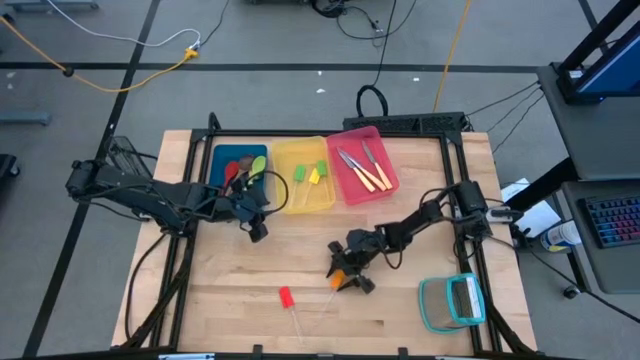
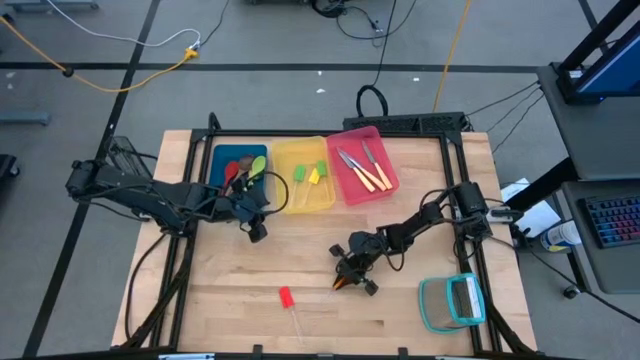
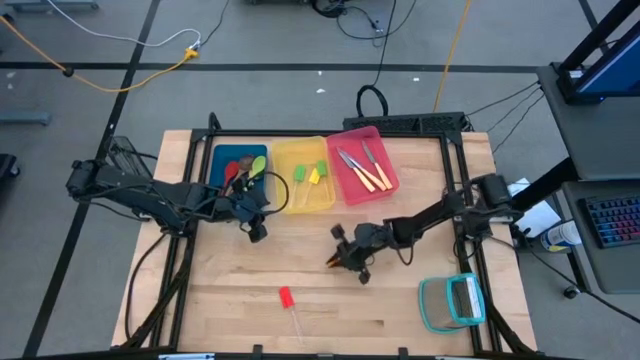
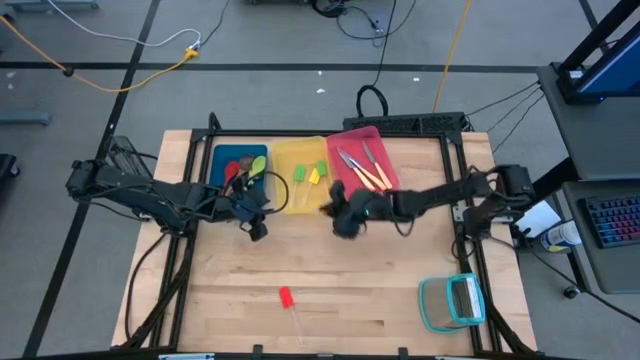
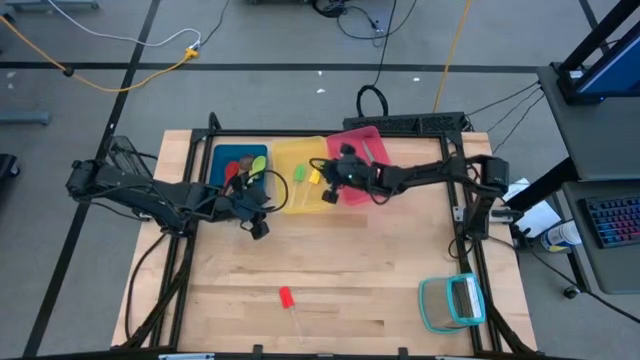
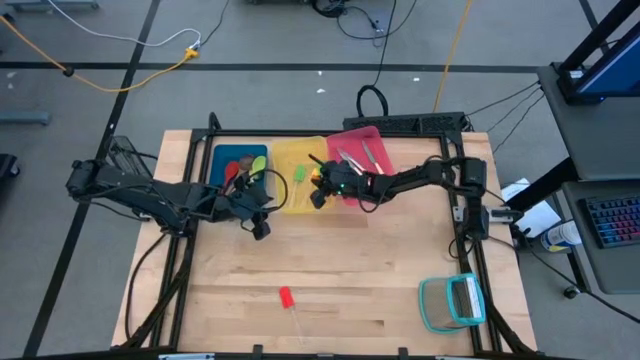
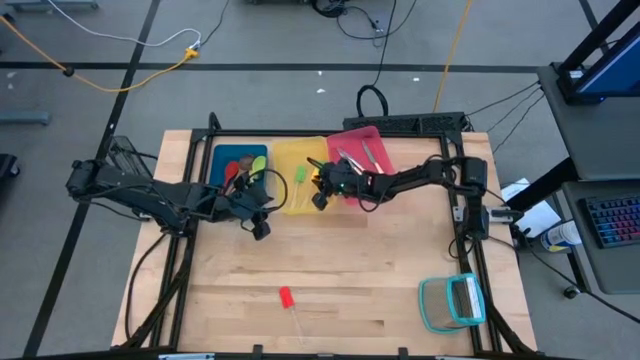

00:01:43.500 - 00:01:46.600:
Task: Pick & Place Kitchen Items
Put the orange spatula into the yellow bin

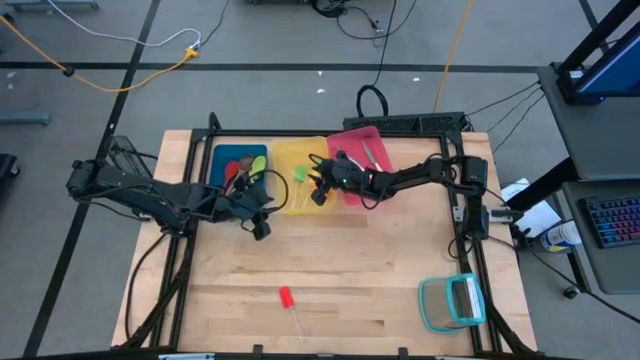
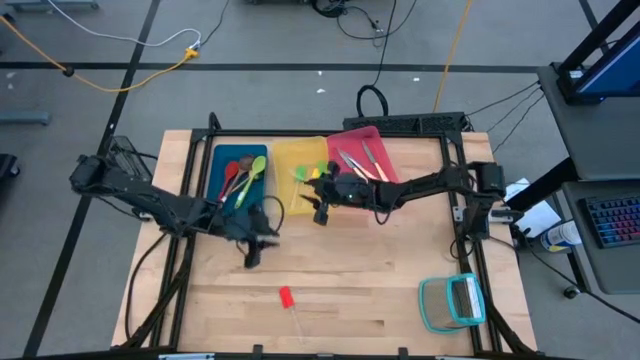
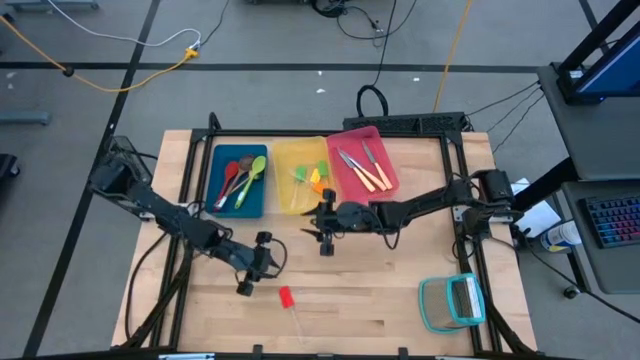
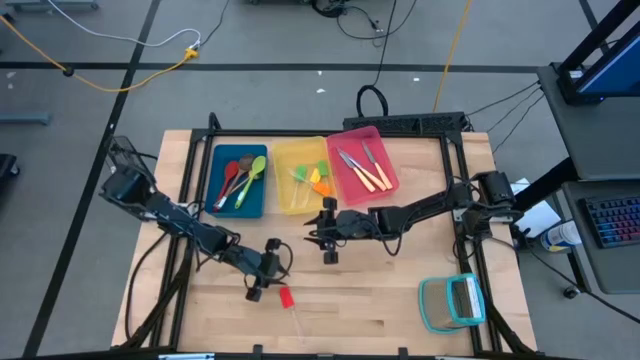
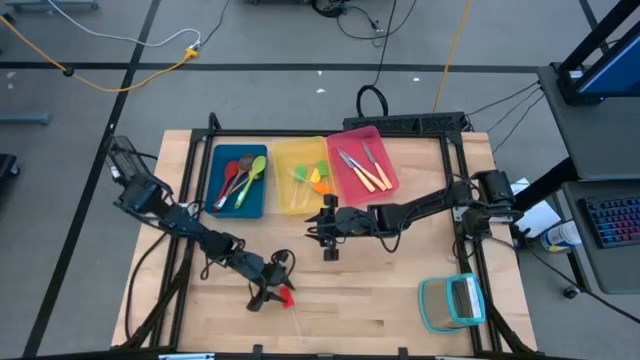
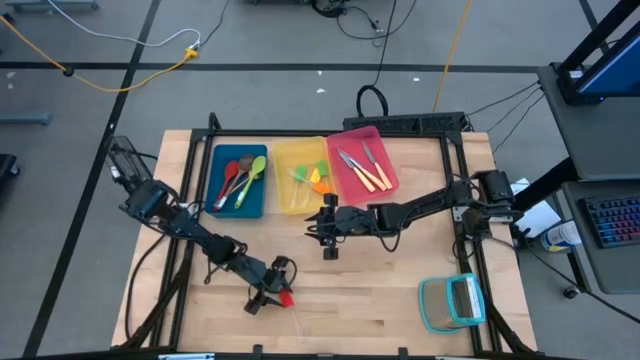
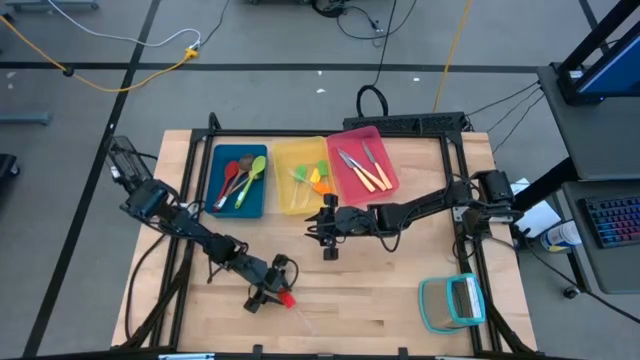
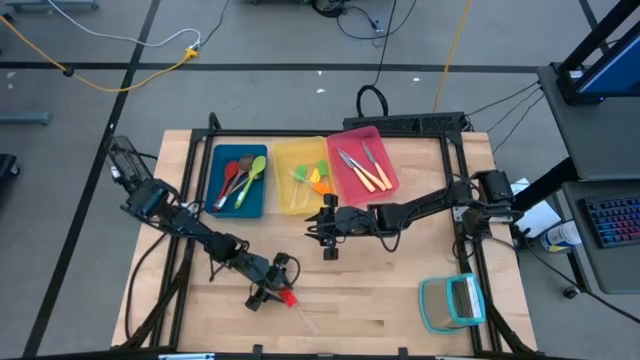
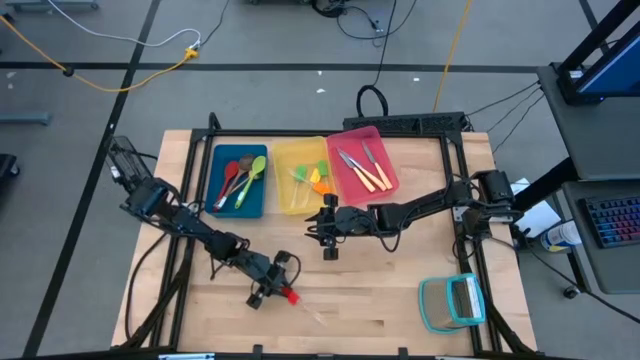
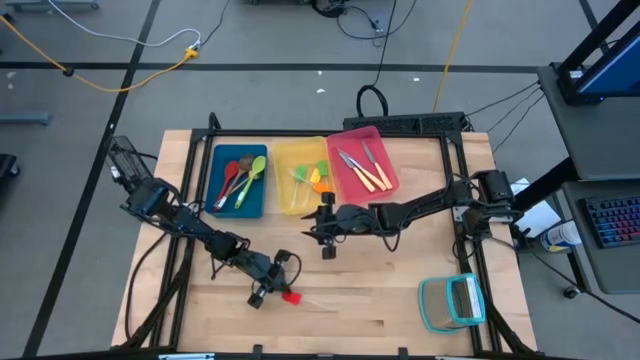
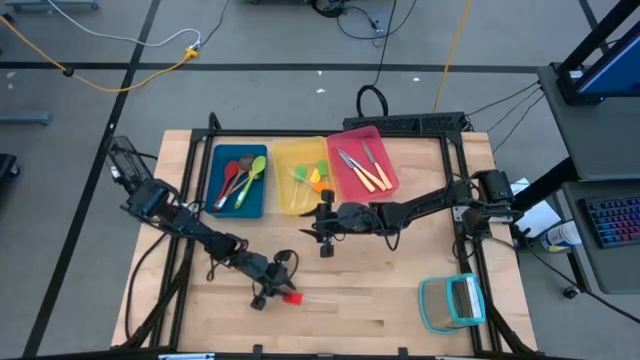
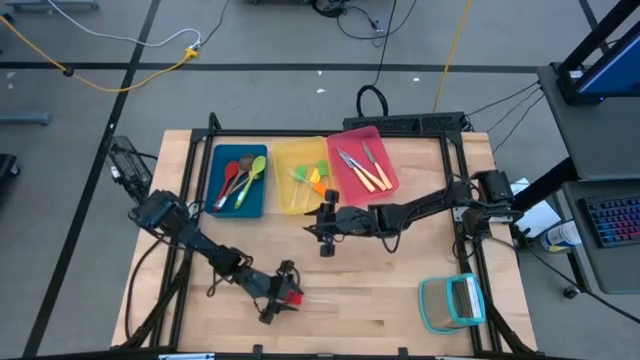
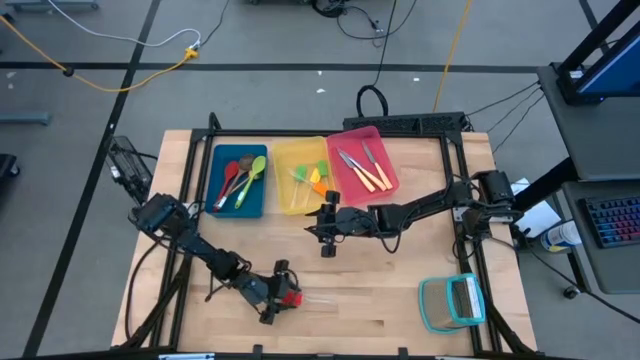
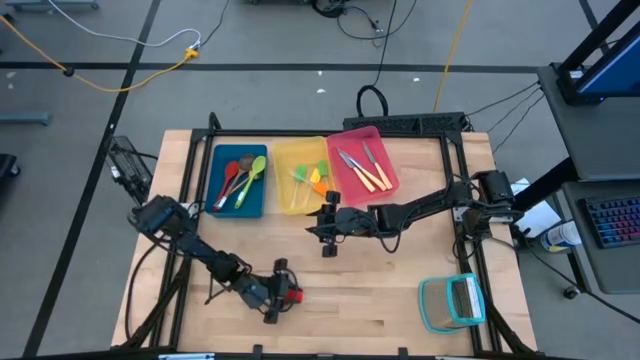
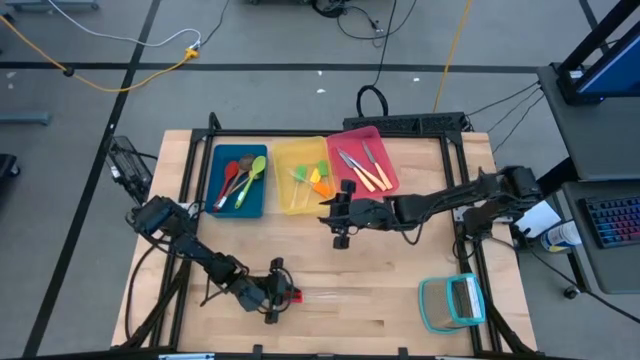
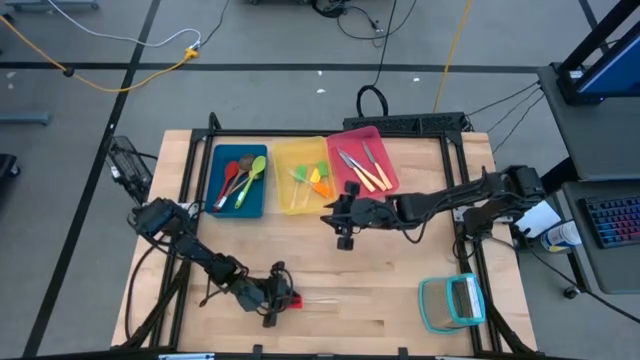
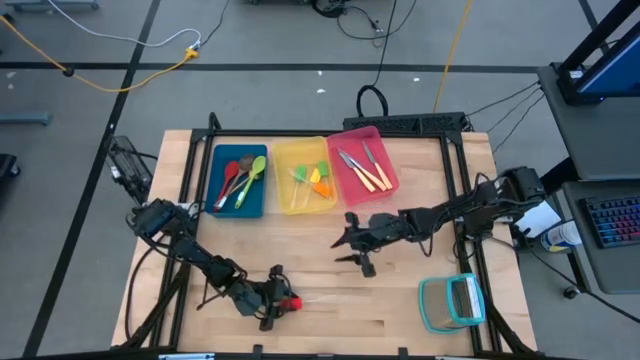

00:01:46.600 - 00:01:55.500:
Put the red spatula into the yellow bin

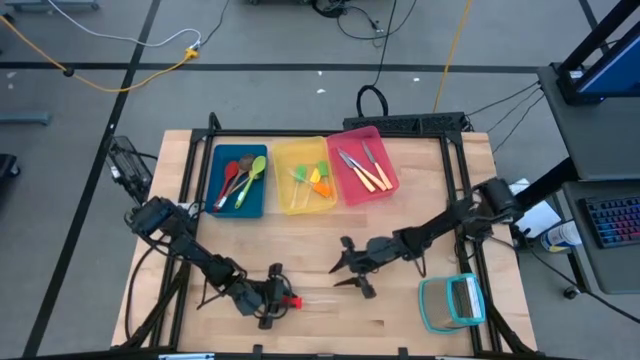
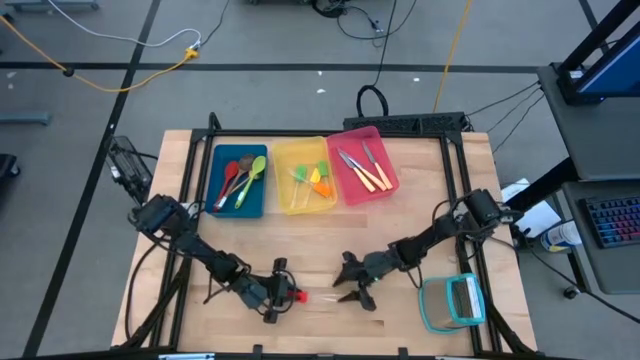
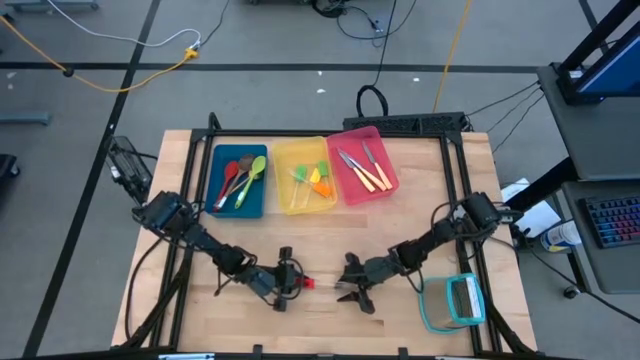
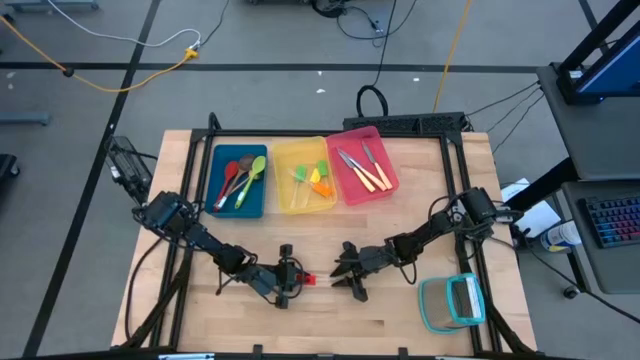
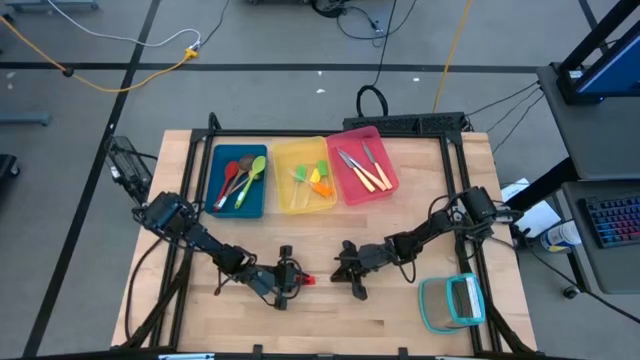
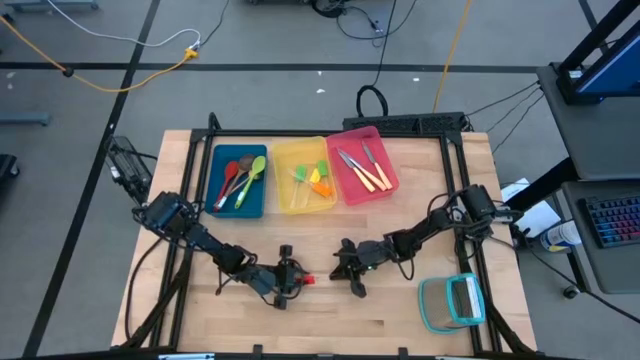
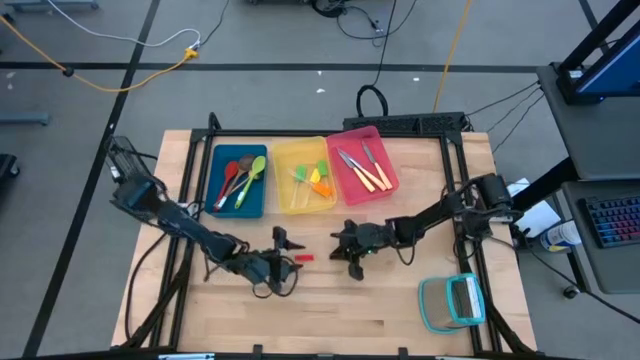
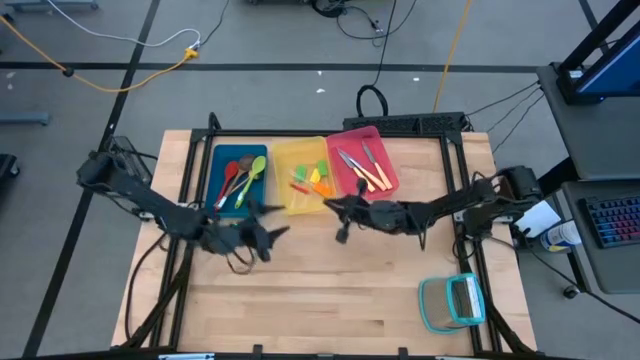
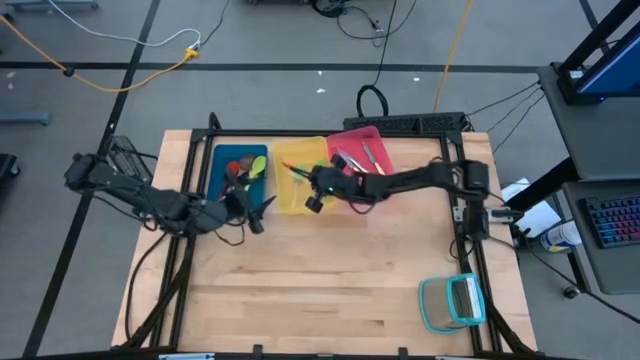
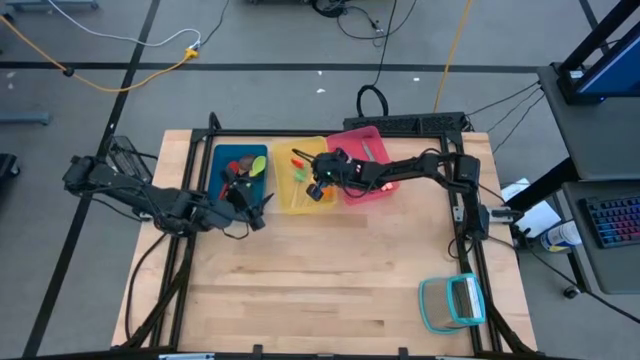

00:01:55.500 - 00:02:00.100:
Put the red spatula into the yellow bin

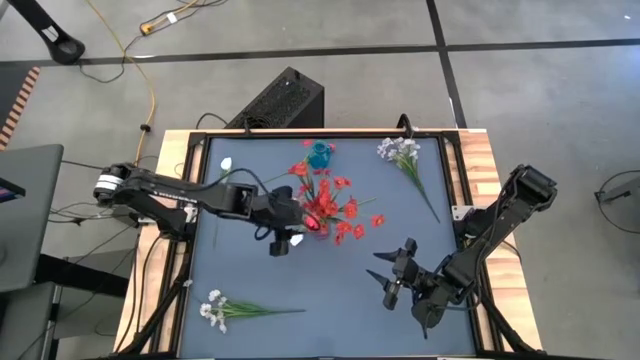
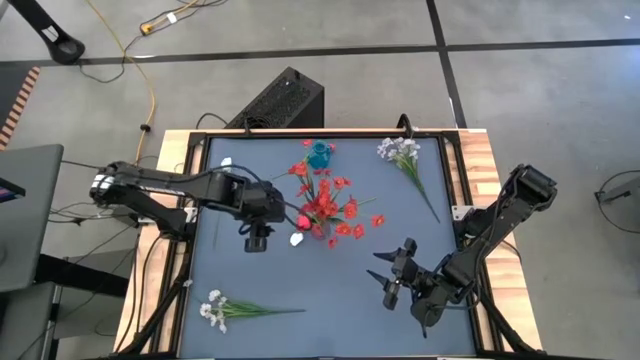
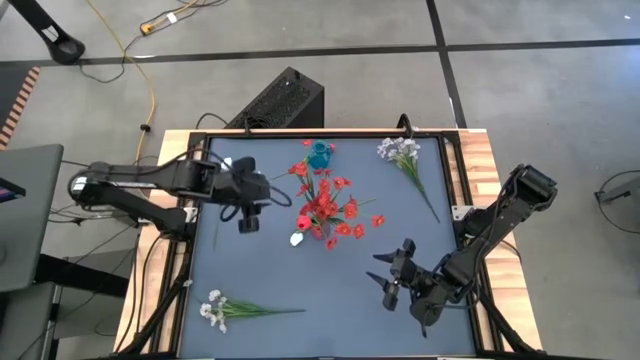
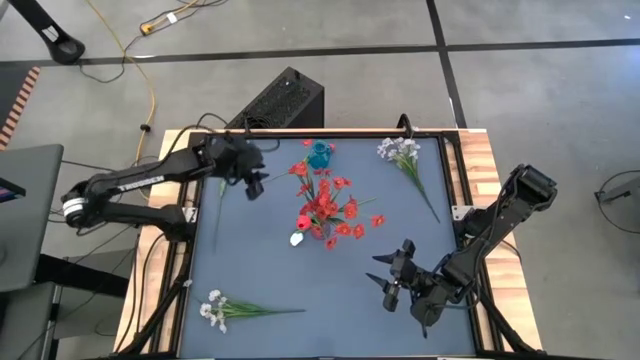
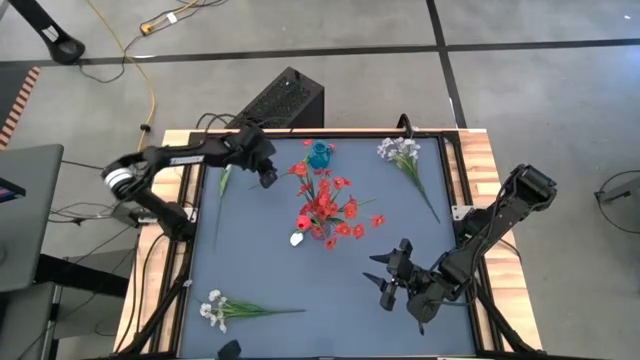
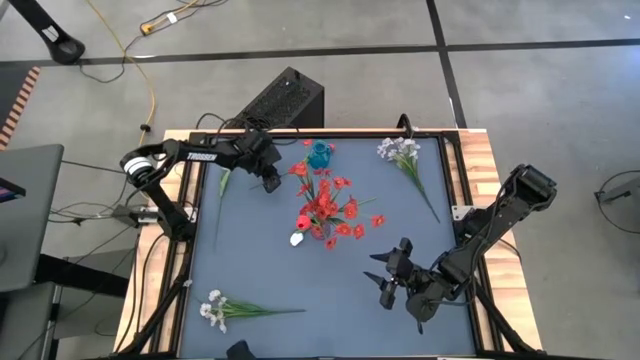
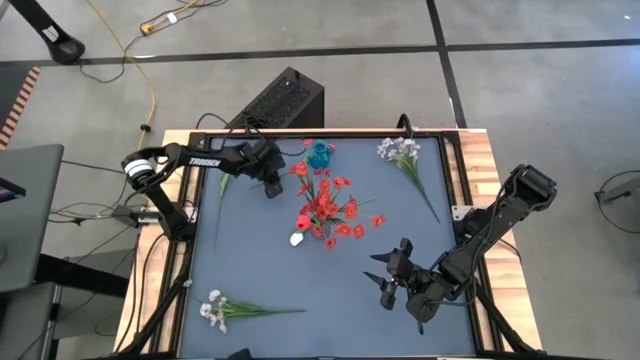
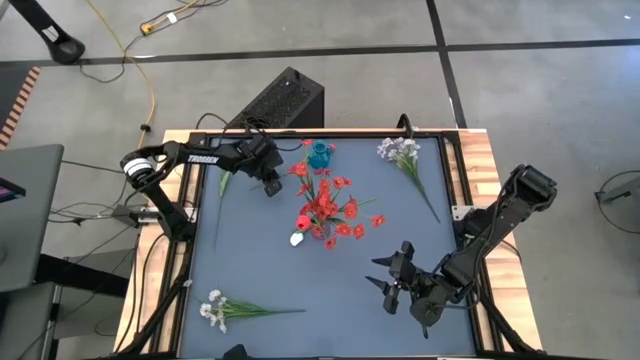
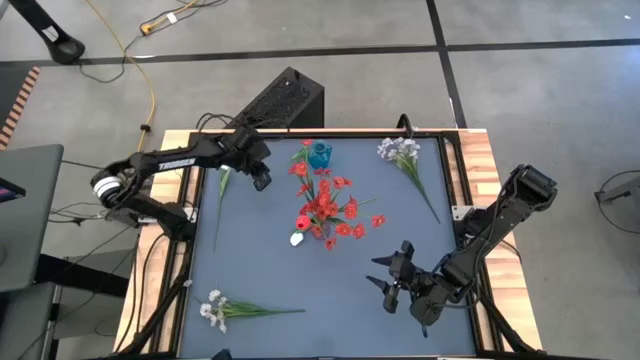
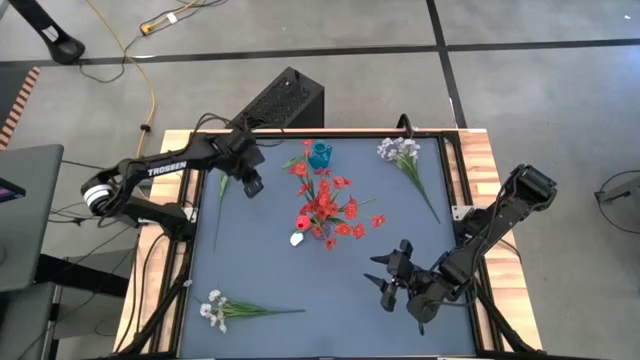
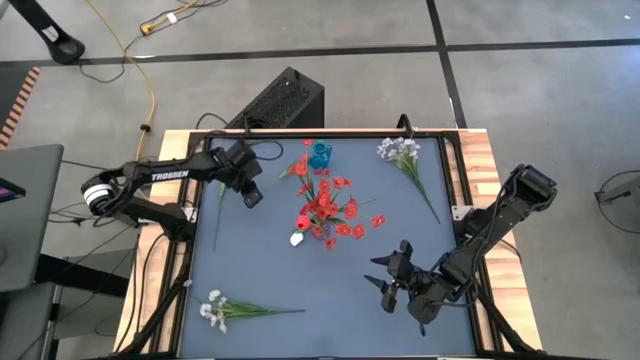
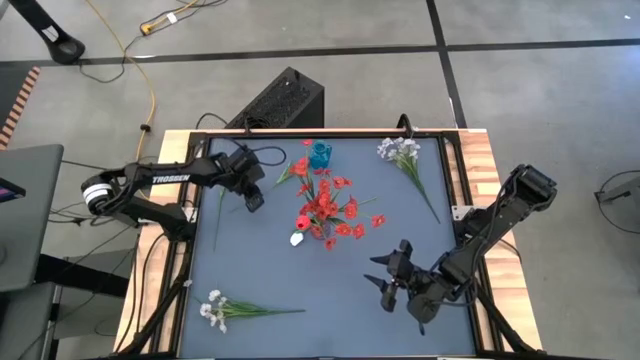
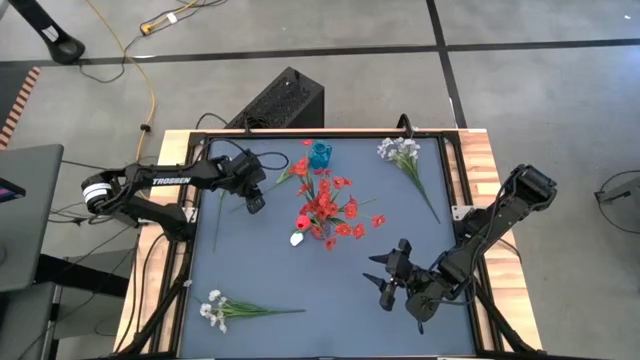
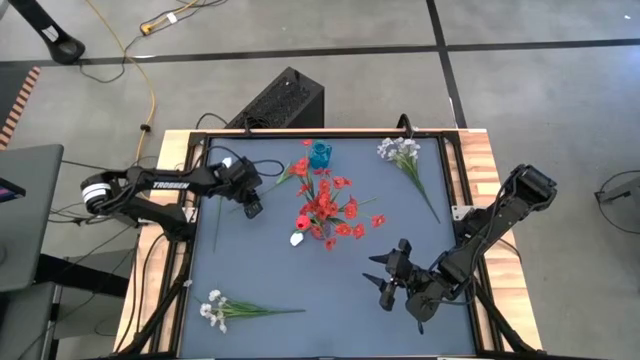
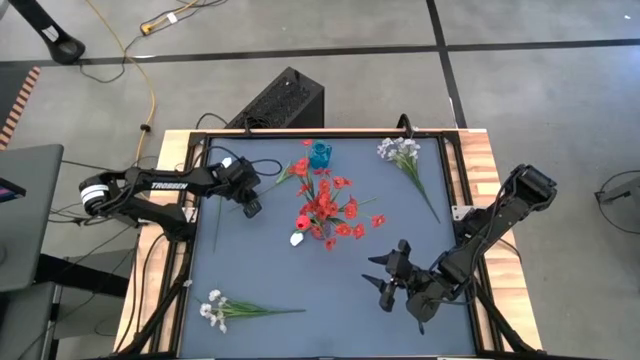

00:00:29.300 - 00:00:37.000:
Task: Sort flowers into vase by color
Put the red tulip into the violet vase
